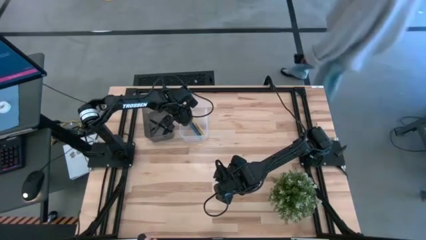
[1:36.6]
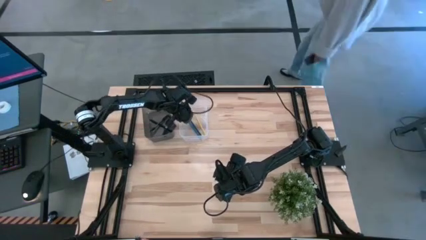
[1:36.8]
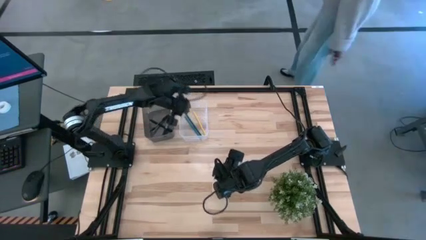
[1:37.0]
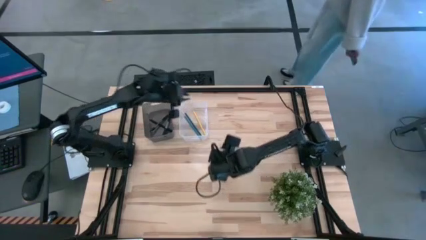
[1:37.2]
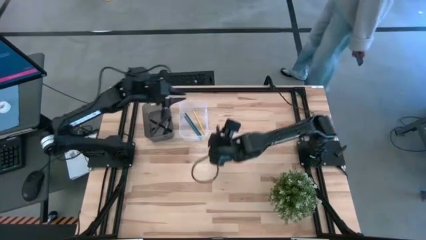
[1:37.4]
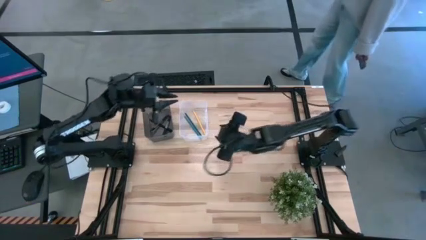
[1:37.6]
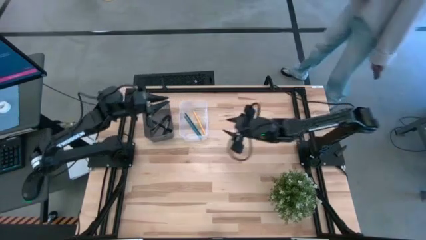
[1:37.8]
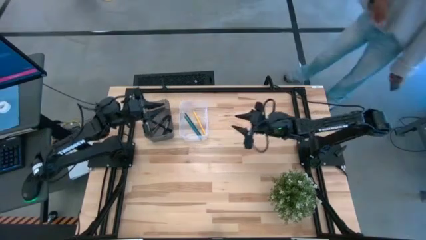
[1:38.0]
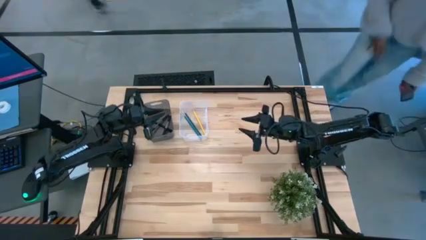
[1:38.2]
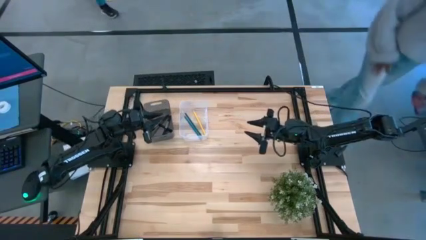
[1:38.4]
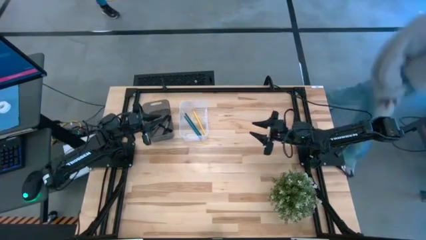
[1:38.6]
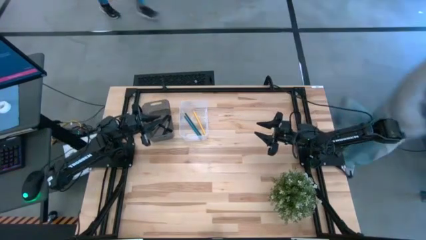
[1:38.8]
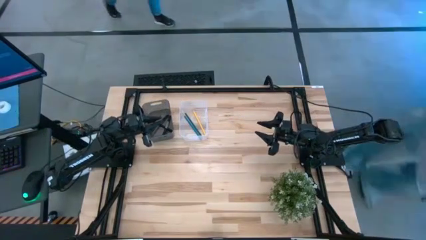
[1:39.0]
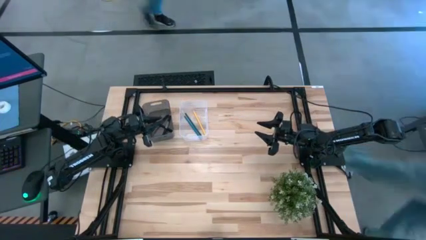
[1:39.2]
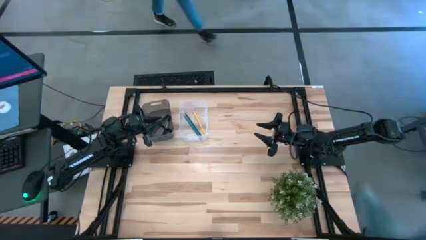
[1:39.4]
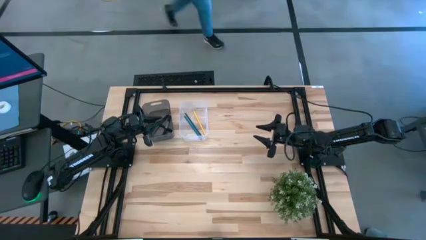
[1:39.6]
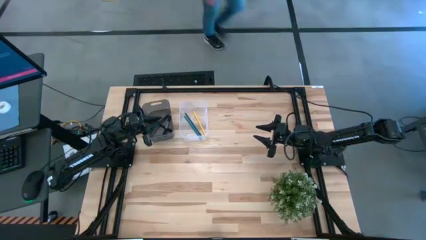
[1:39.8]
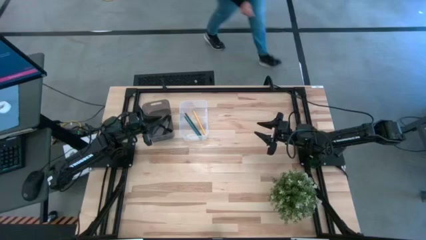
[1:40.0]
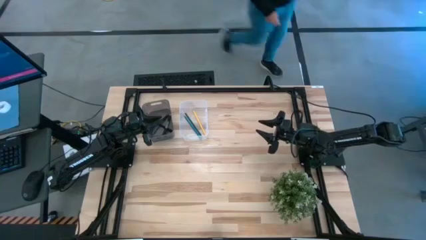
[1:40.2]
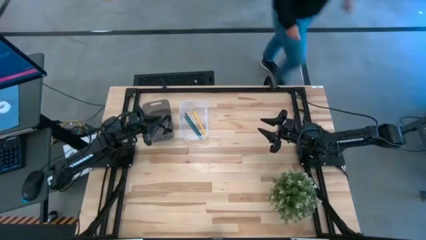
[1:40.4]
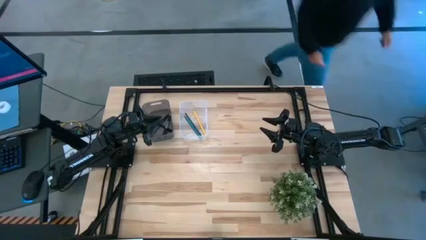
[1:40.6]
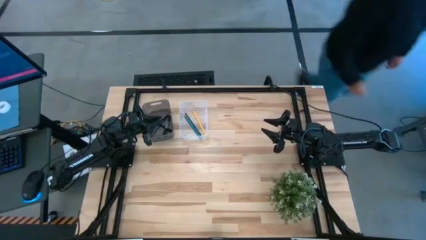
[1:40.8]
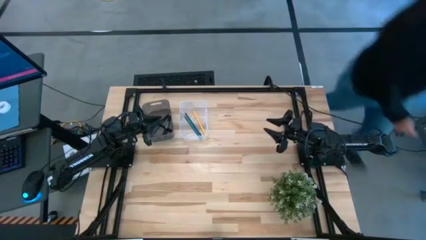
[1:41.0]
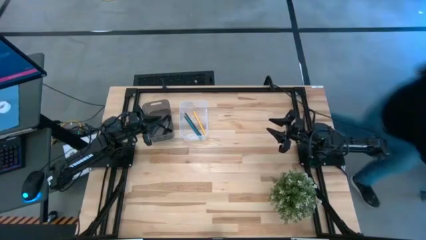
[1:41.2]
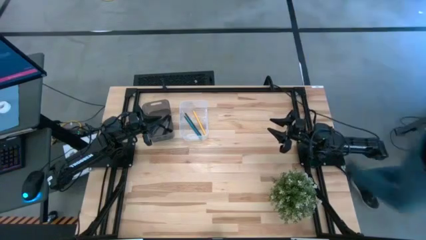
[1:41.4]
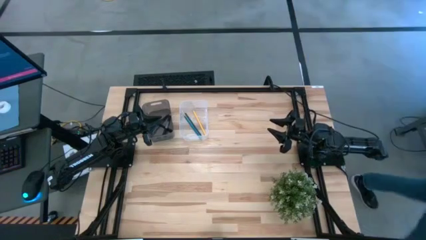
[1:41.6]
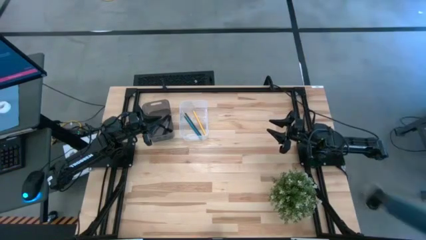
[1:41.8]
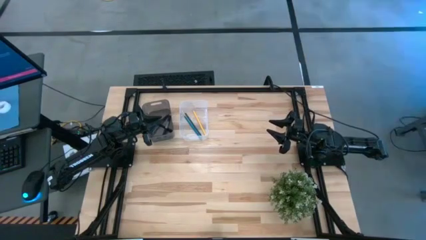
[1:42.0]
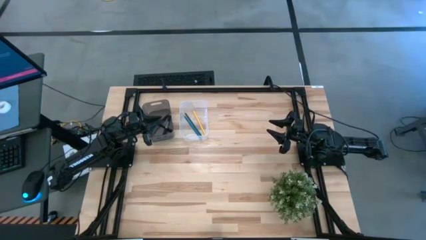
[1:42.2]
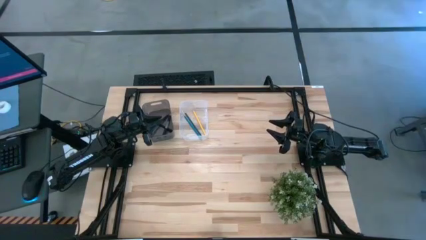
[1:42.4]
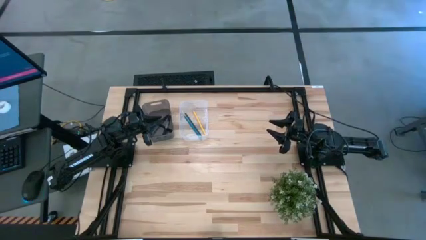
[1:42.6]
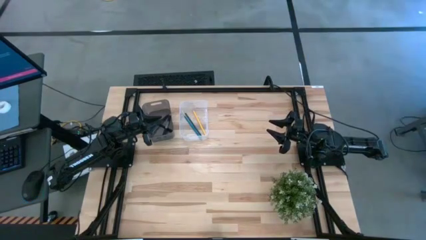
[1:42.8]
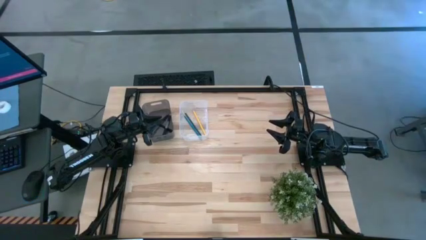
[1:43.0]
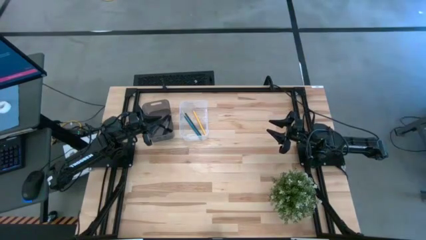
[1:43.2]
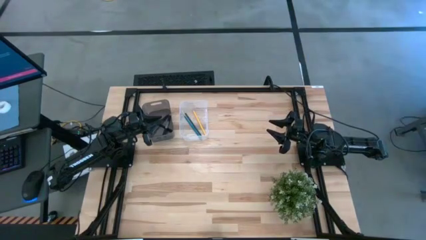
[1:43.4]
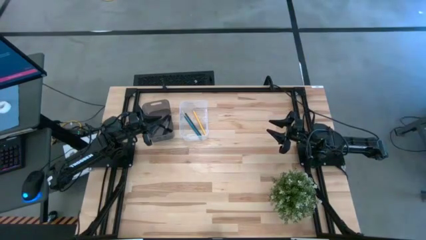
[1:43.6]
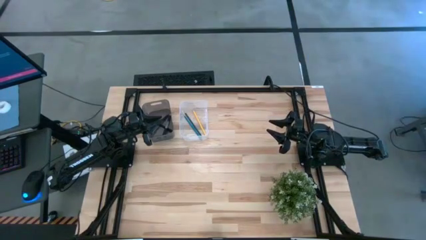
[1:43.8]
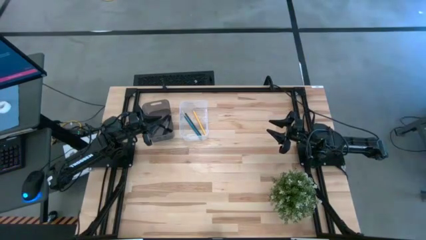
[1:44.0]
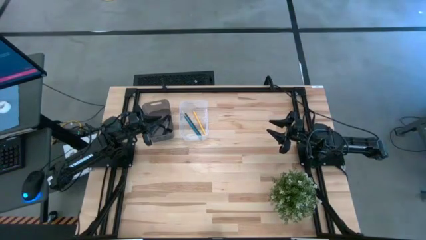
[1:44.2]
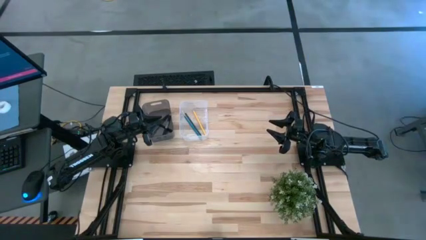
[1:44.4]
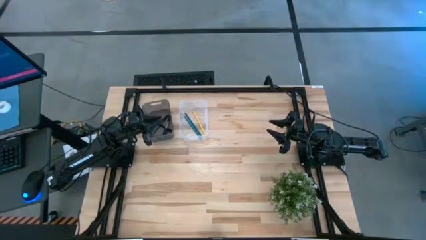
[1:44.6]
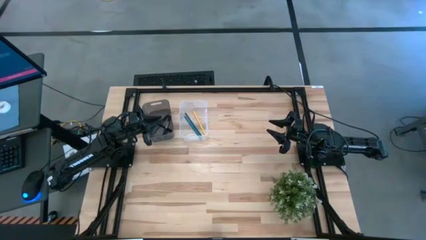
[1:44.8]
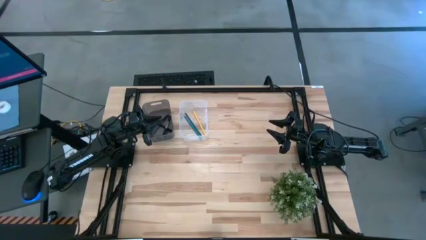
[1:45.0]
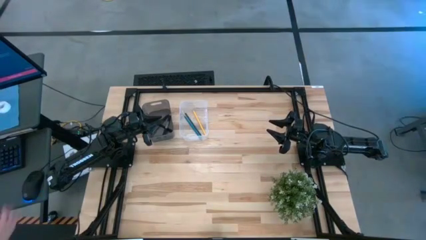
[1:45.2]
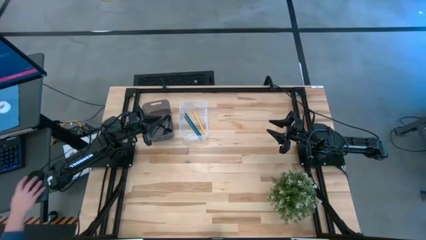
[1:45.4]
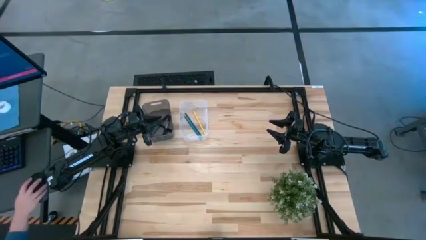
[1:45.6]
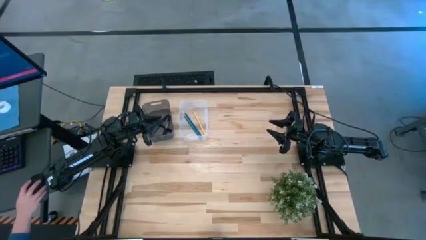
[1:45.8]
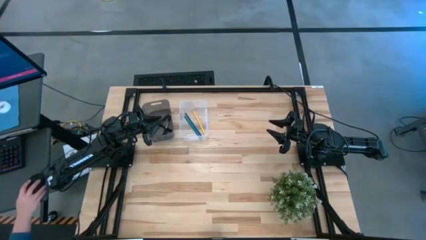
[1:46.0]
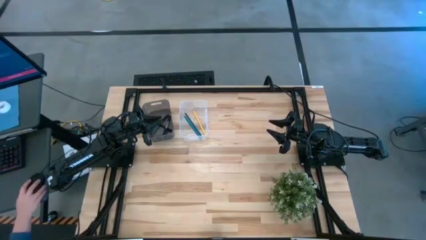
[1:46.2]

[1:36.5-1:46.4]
Task: Sort pens & pencils
Return To Home Position

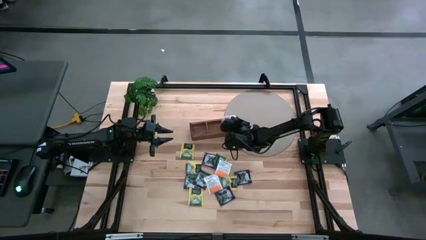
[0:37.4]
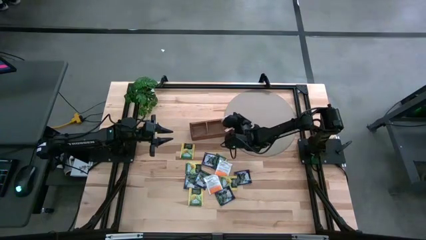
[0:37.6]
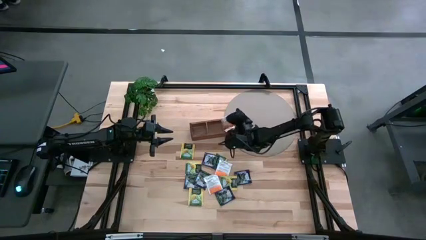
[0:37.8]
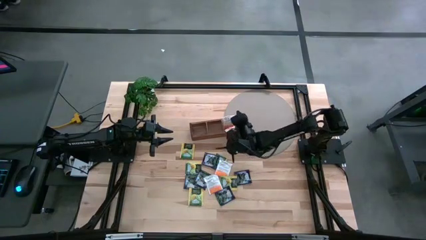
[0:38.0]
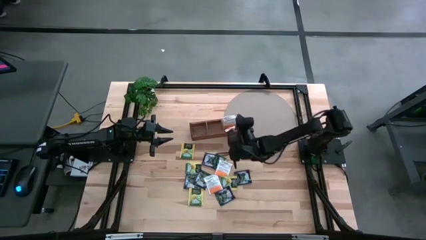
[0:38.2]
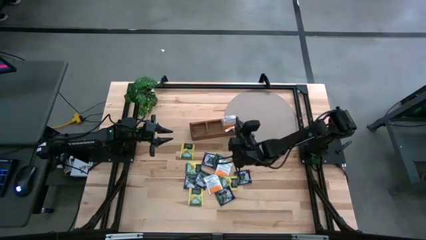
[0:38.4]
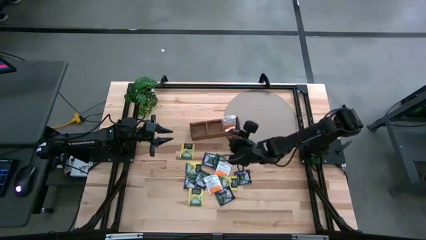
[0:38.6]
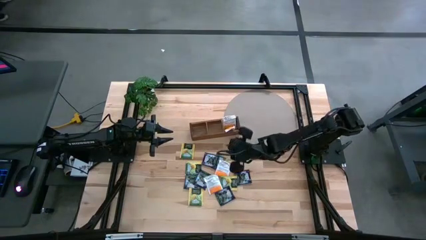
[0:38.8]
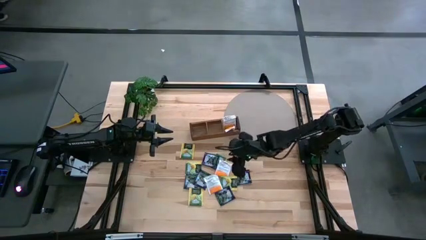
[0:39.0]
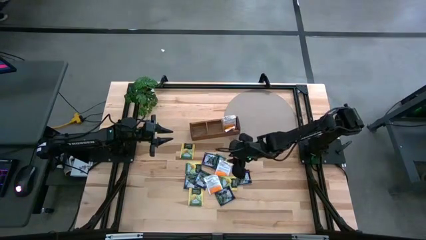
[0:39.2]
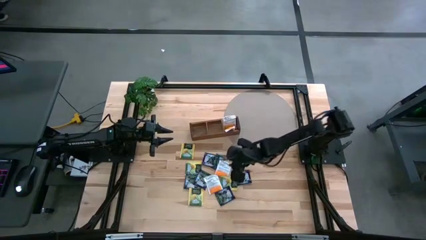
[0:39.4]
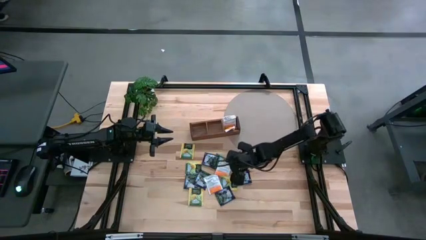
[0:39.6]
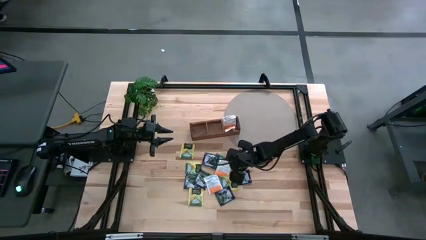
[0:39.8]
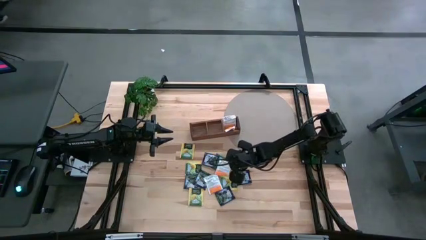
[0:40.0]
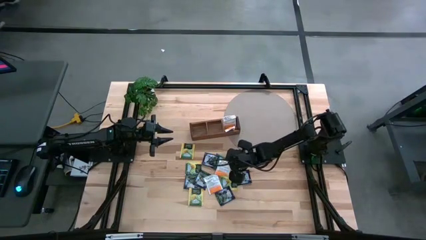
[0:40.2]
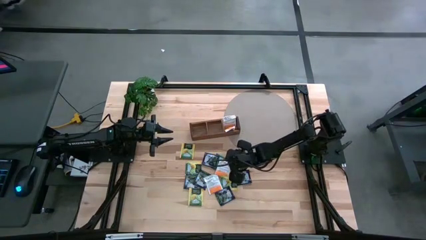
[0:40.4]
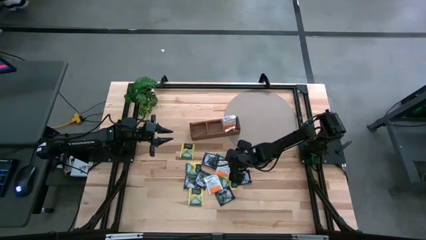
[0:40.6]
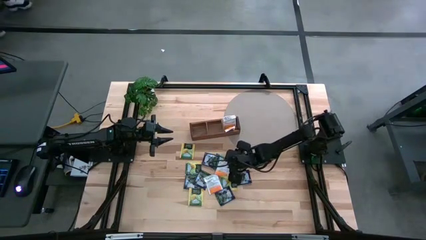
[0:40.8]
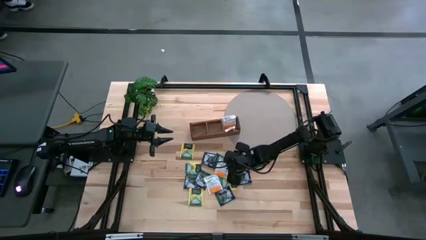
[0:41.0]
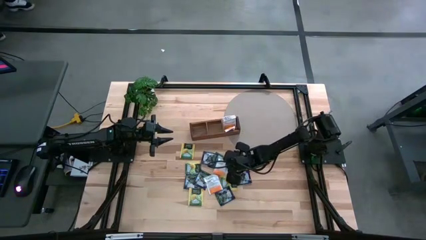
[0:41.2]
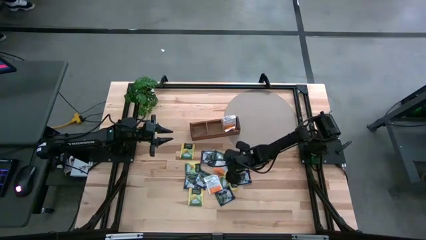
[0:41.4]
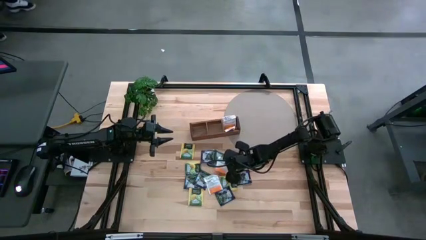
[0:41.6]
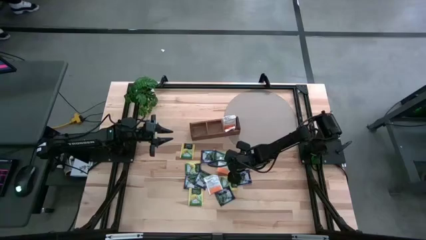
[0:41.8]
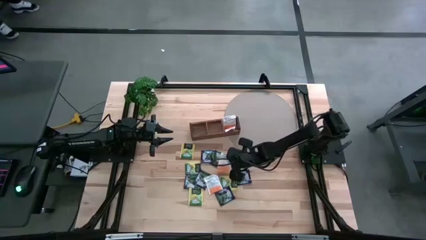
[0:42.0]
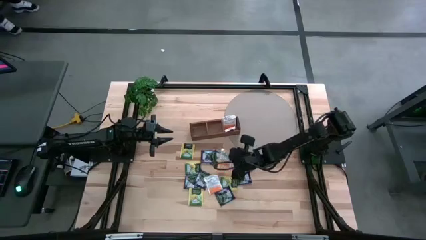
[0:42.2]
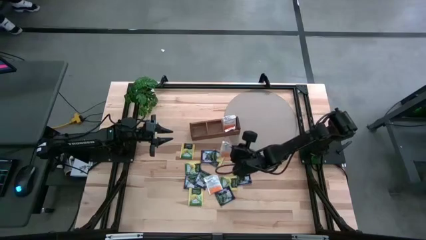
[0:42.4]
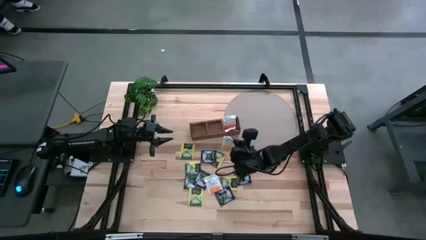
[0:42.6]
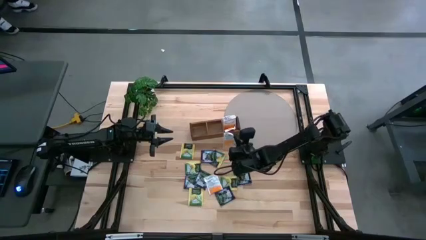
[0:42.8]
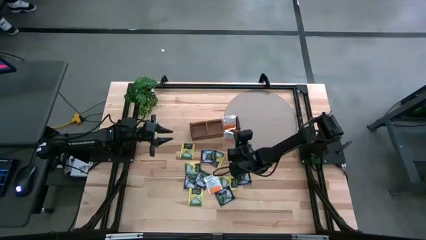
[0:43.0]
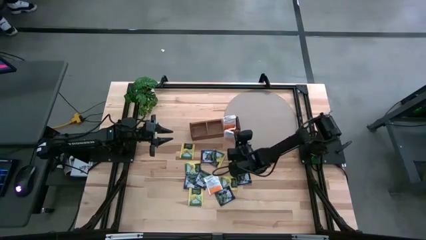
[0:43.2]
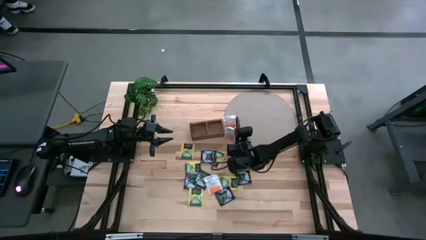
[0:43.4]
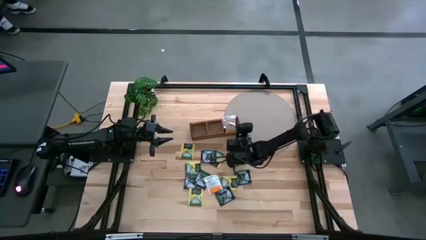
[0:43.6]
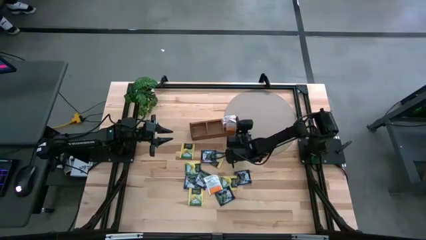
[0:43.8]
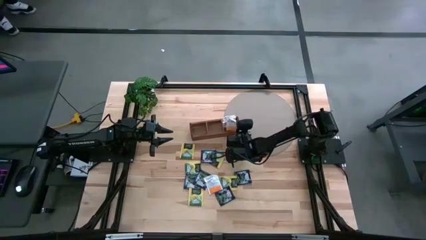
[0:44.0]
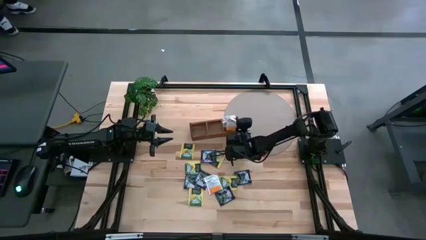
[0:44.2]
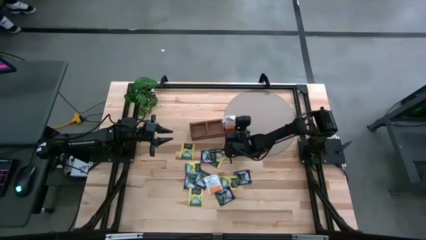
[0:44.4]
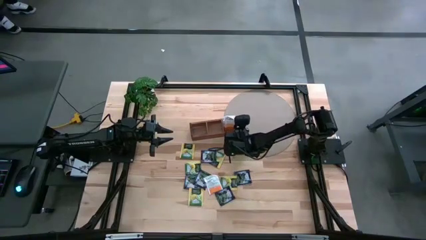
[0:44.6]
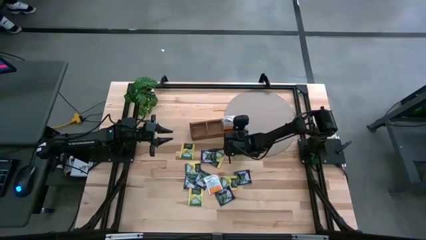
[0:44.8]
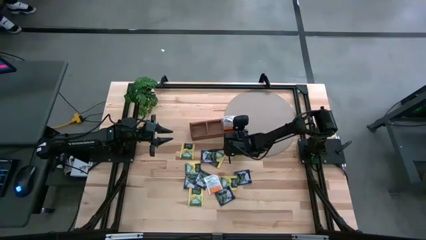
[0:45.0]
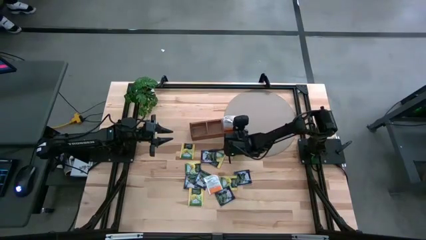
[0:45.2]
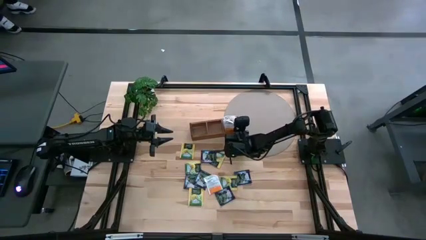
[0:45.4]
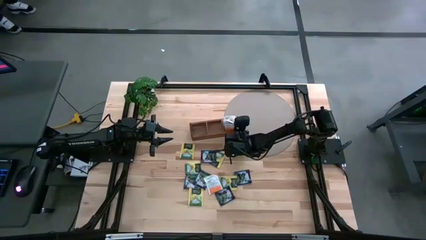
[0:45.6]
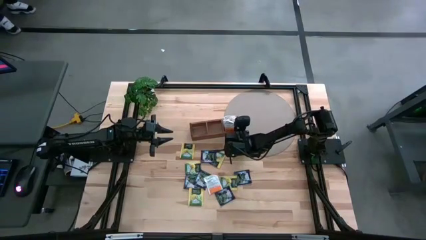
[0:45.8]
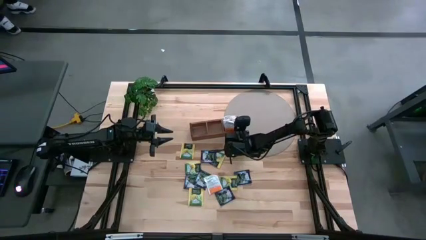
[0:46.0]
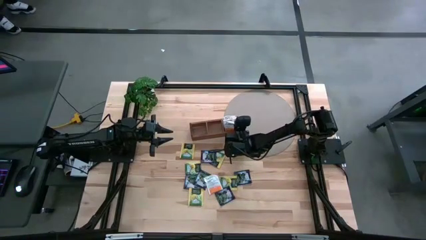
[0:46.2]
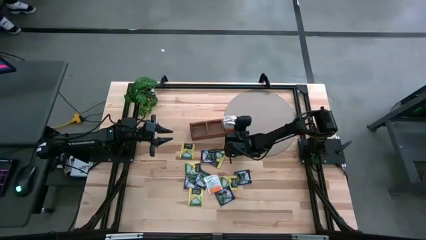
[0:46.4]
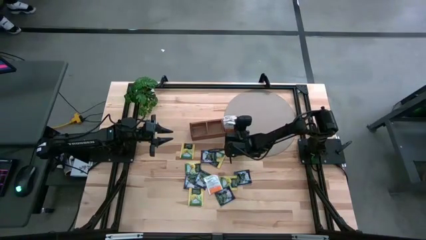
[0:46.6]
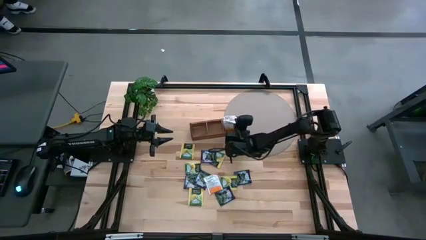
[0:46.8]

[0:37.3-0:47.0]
Task: Pick & Place Tea
Put the white tea bag into the right section of the wooden organizer
